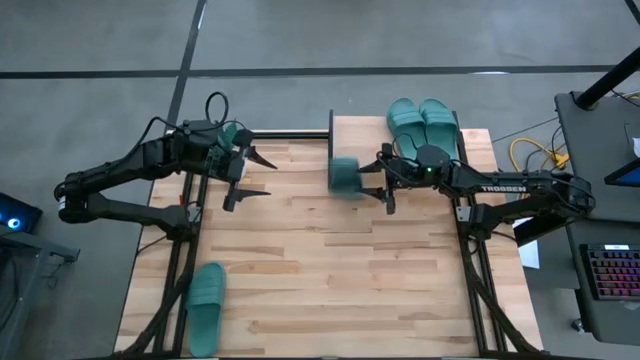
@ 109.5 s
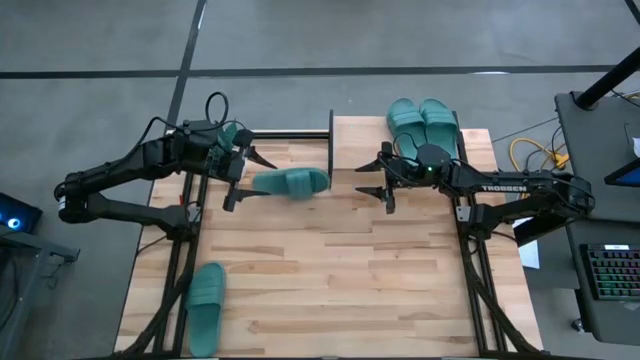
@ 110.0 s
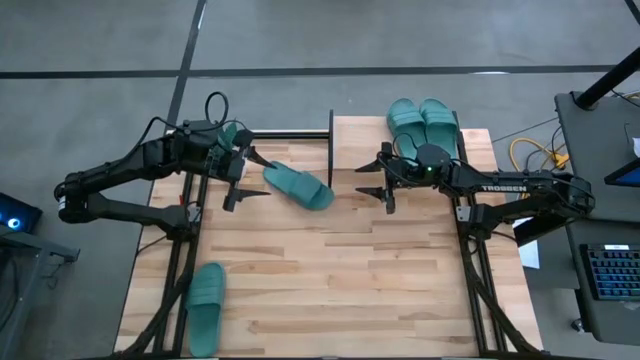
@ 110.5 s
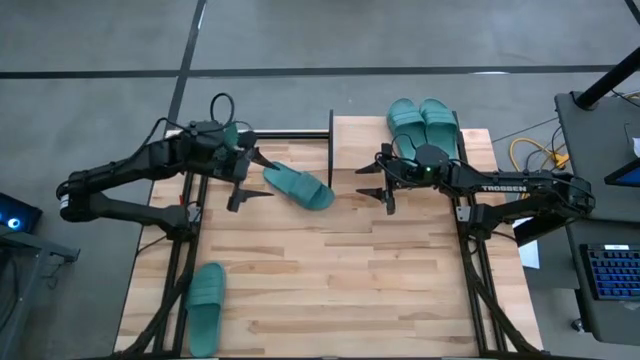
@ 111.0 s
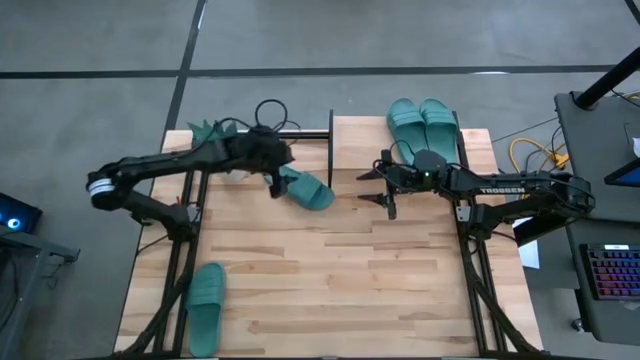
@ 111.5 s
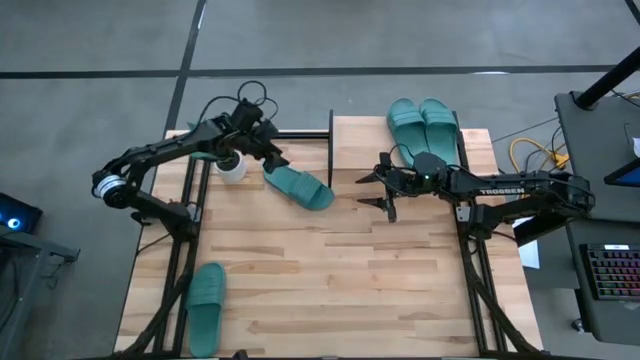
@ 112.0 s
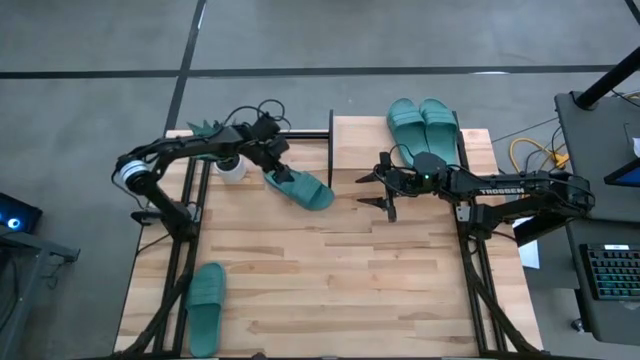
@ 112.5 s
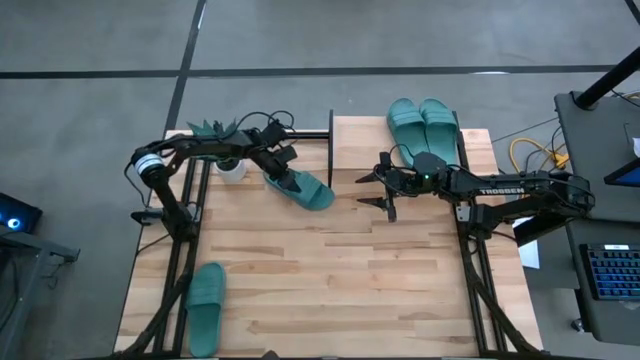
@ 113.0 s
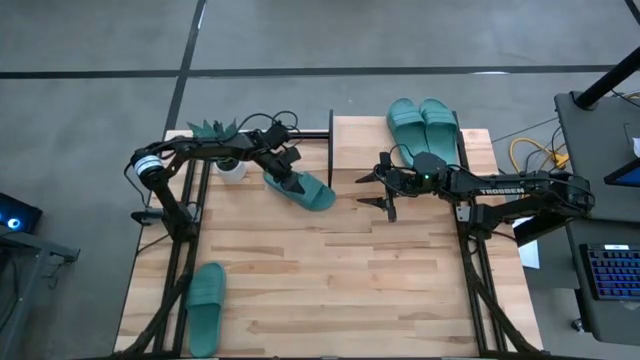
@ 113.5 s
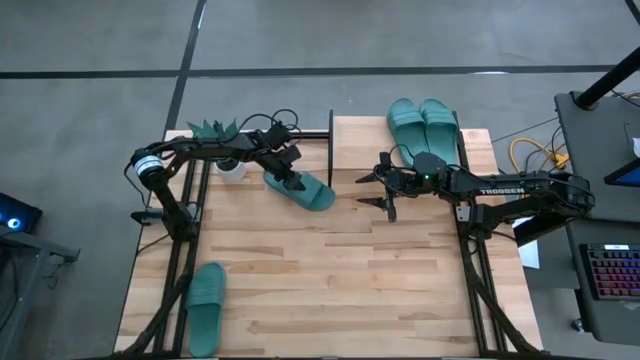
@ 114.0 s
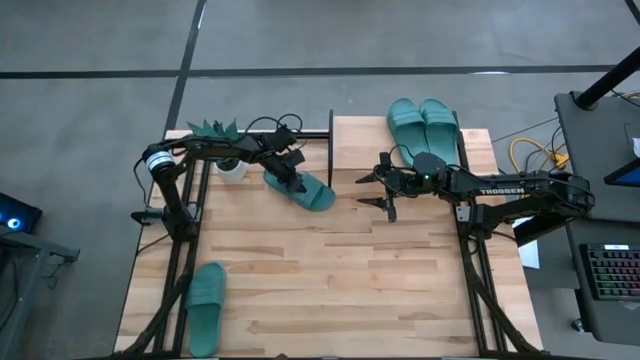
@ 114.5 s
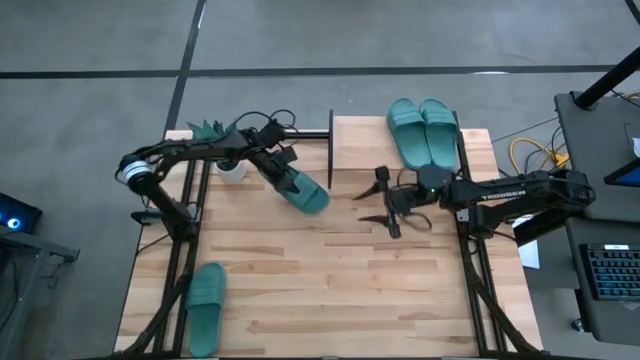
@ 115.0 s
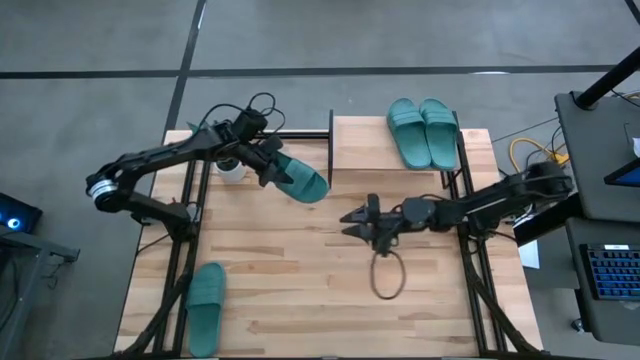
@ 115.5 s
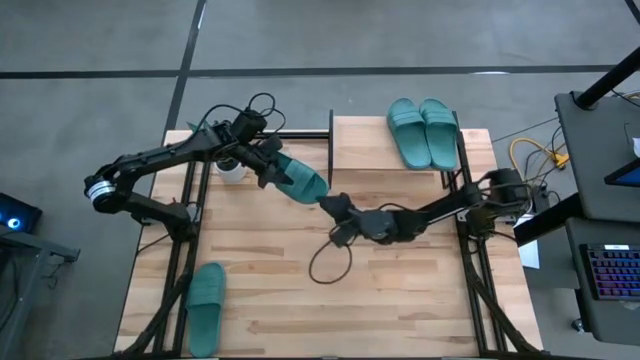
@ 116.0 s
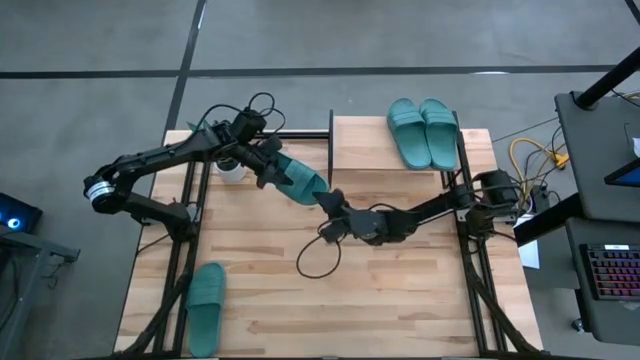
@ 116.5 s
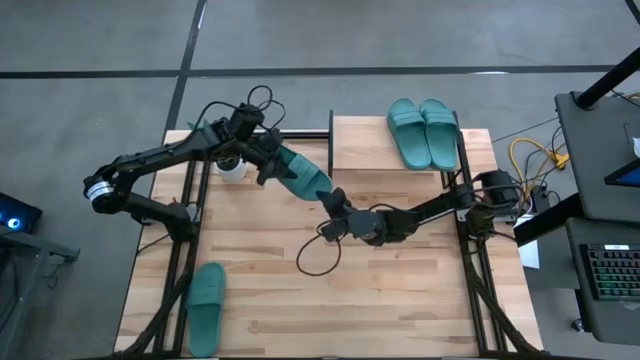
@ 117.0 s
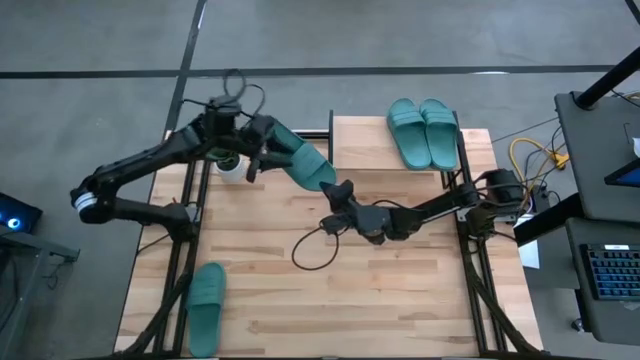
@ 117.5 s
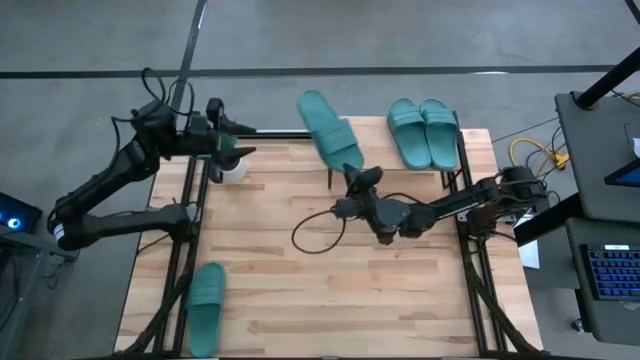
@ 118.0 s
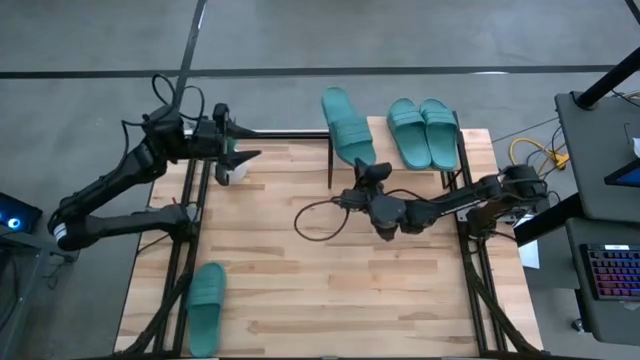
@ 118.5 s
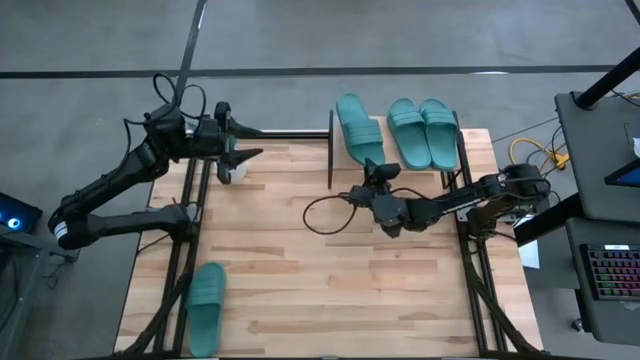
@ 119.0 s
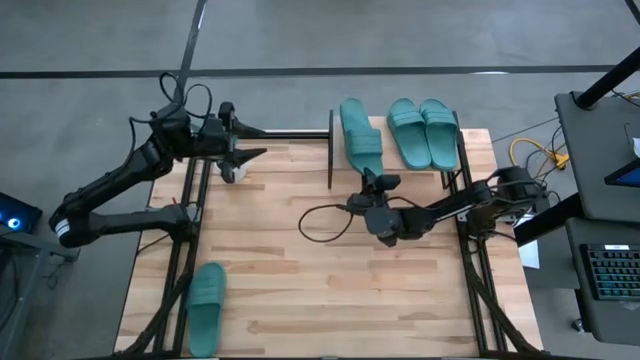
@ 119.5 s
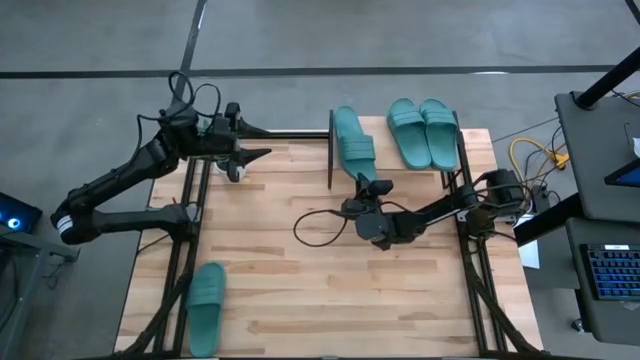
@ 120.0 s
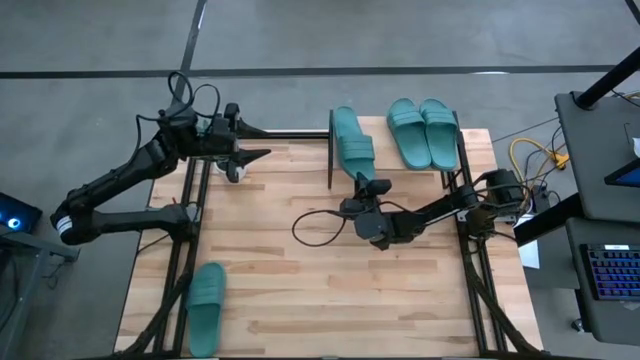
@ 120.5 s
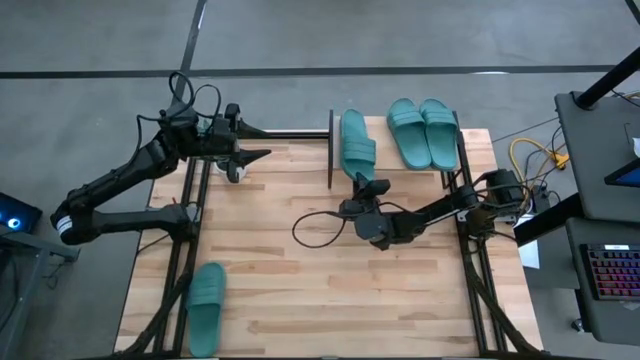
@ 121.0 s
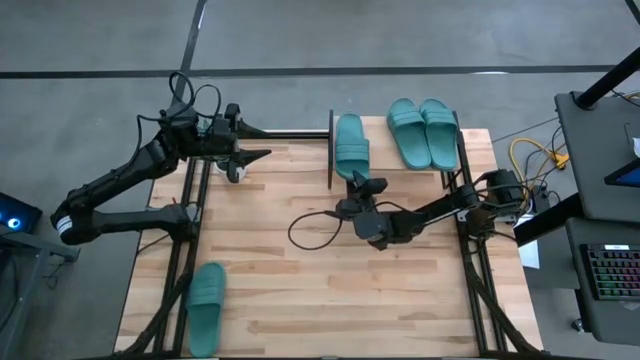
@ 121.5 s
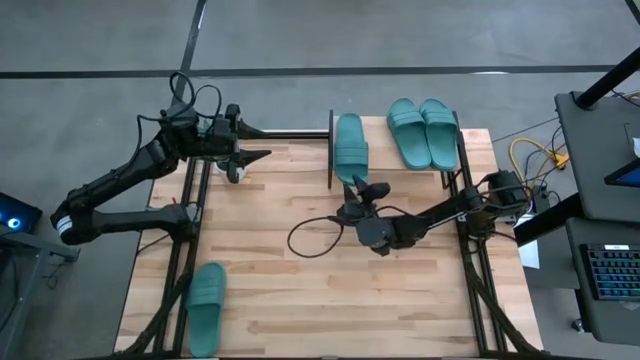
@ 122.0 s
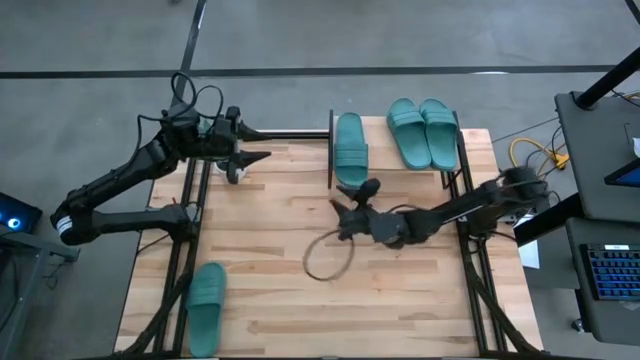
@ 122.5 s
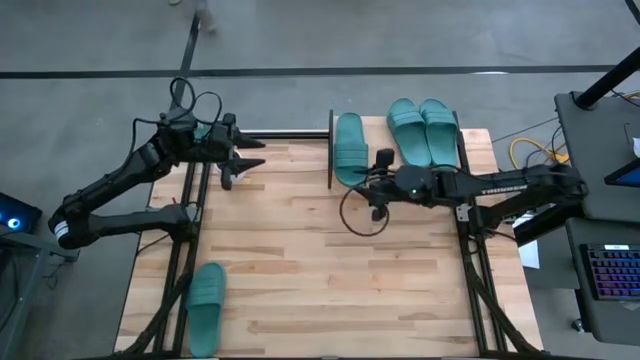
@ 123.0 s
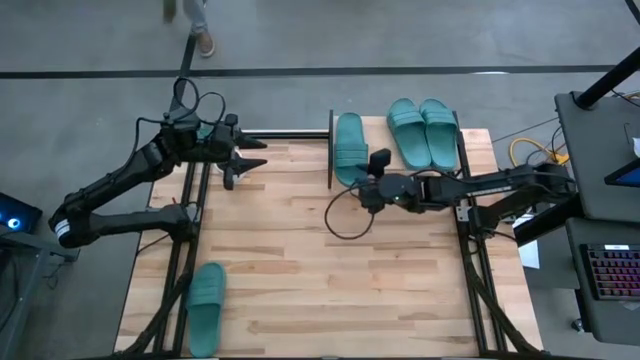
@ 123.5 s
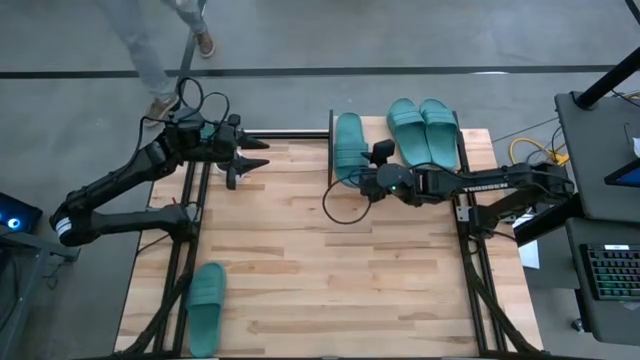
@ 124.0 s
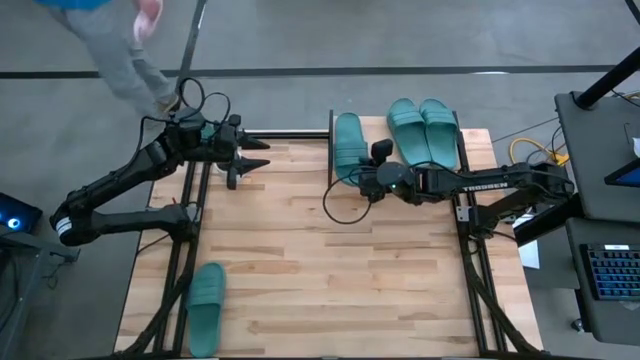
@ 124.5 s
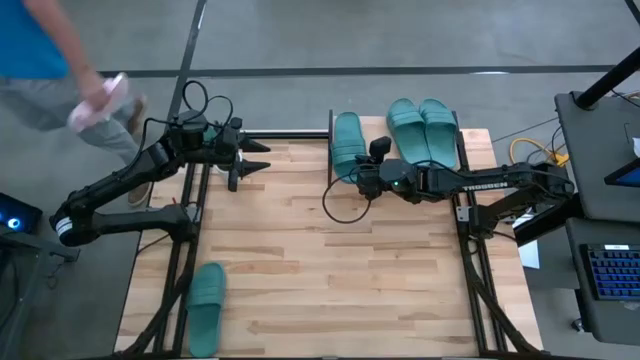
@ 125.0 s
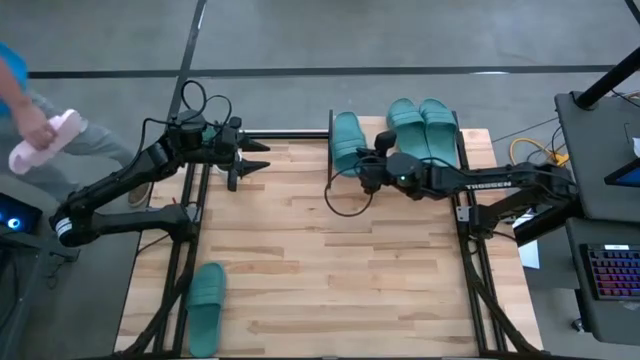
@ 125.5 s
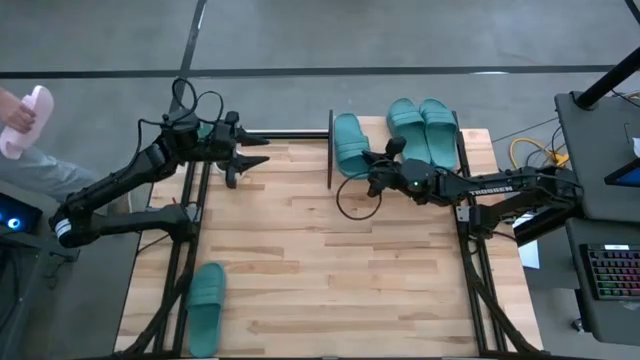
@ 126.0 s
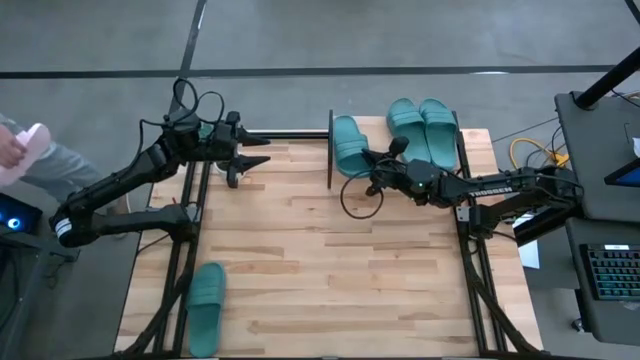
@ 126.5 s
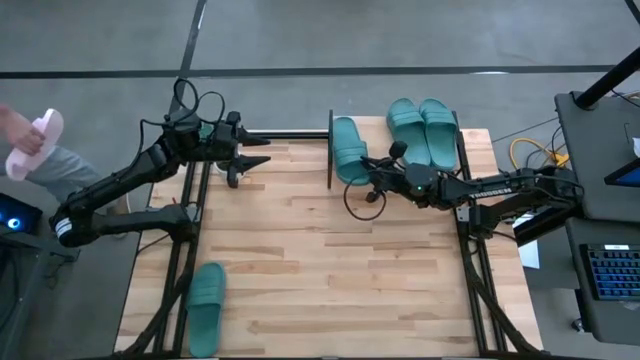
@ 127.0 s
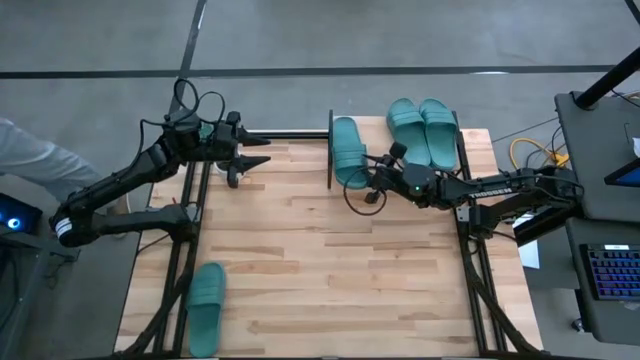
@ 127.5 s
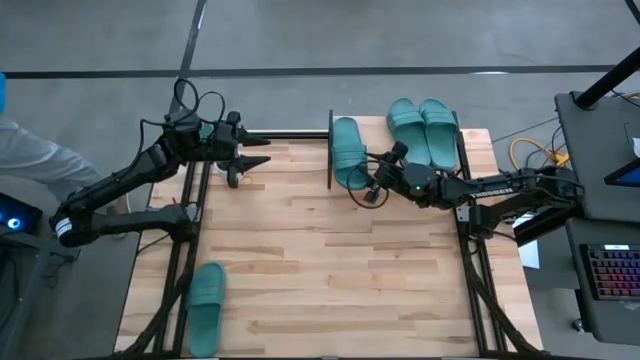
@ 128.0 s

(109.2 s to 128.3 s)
Task: Pick and place slides into the shelf
Put the top green slipper on the shelf
